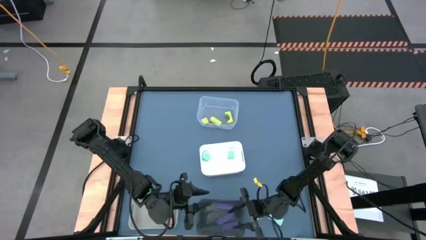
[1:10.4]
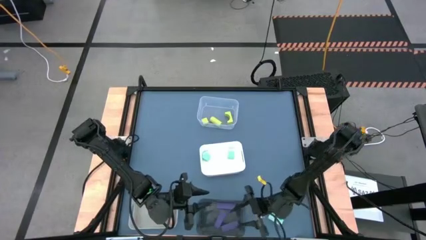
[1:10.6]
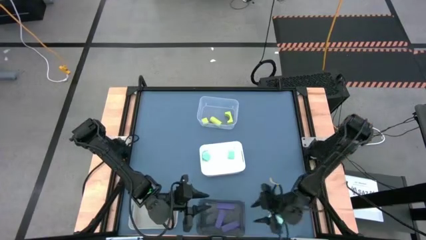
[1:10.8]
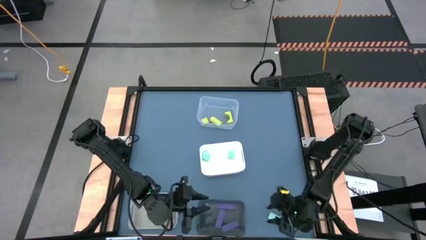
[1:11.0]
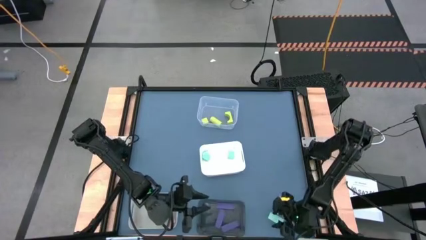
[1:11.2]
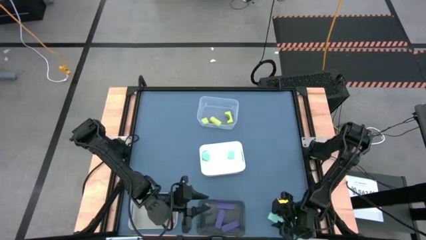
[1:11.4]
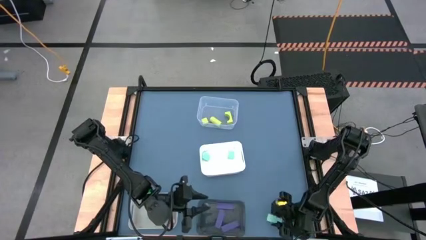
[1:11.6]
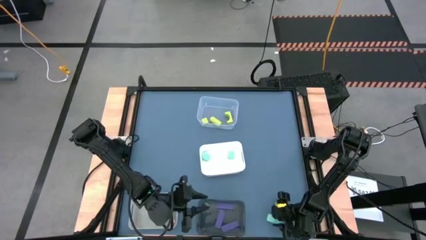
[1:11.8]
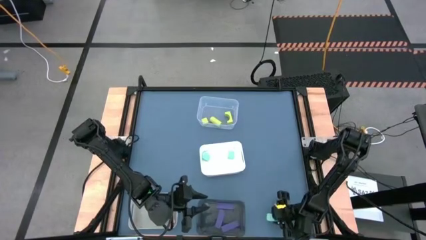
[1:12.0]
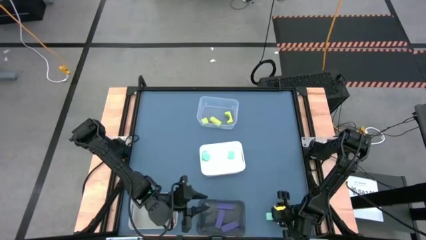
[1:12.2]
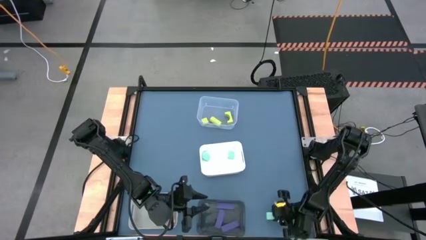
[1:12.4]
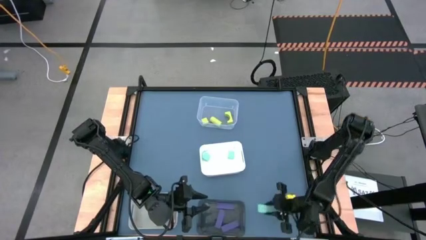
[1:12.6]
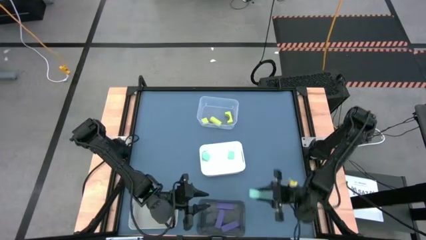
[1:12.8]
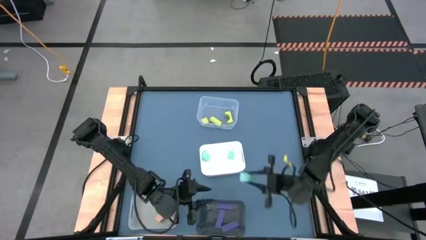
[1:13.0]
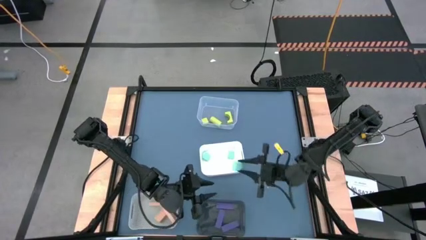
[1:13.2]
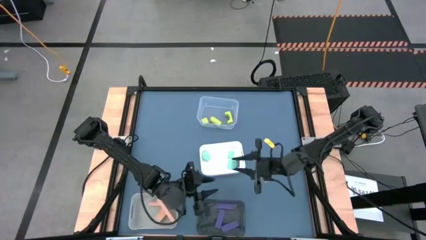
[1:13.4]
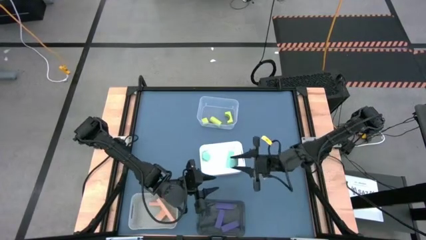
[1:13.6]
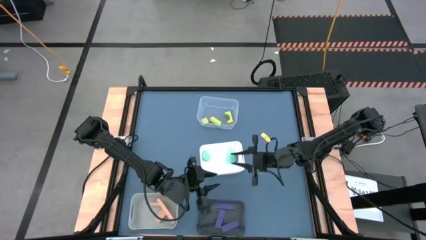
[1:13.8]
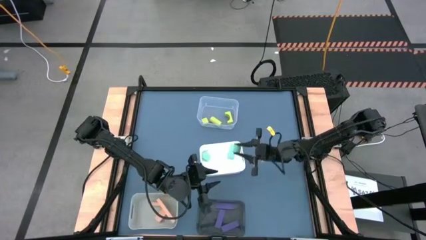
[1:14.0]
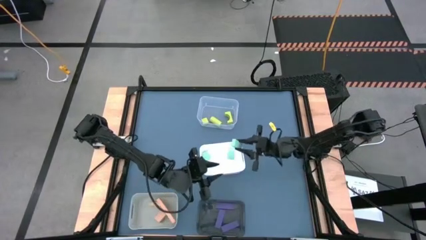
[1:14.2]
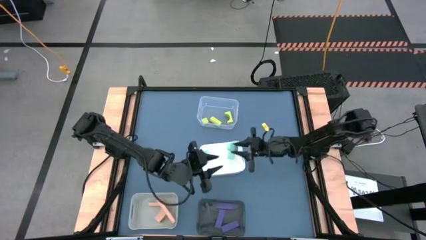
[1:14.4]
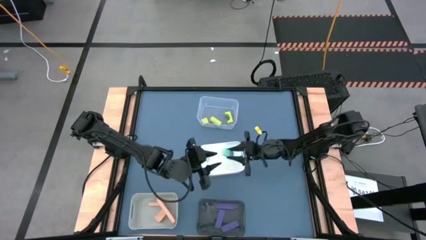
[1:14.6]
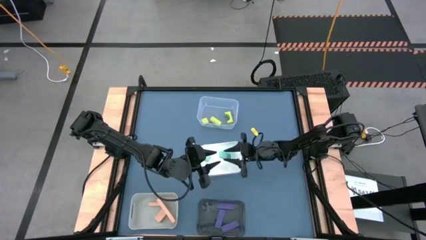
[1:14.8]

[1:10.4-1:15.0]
Task: Sort & place blocks by color
Put the blue block into the white bin

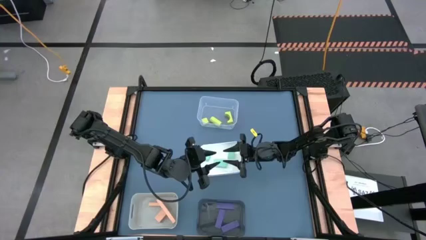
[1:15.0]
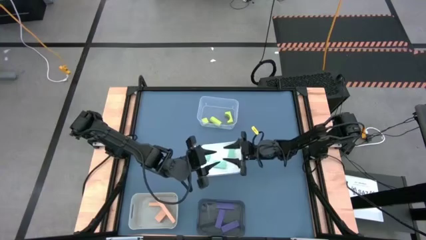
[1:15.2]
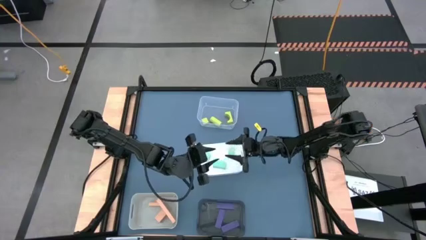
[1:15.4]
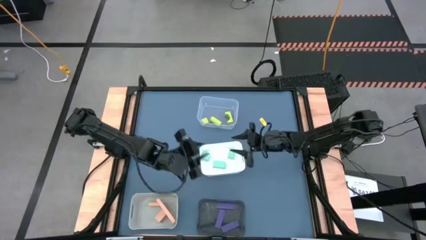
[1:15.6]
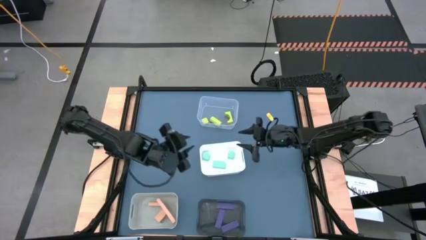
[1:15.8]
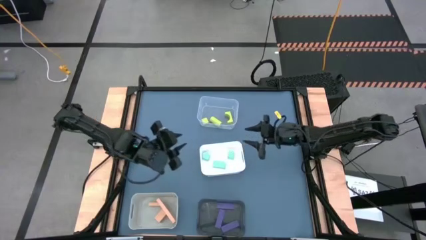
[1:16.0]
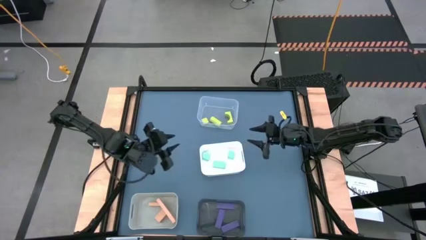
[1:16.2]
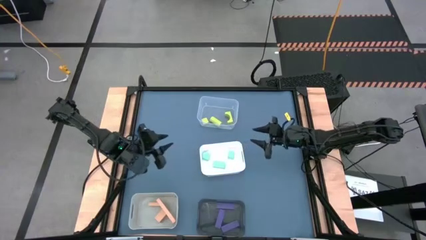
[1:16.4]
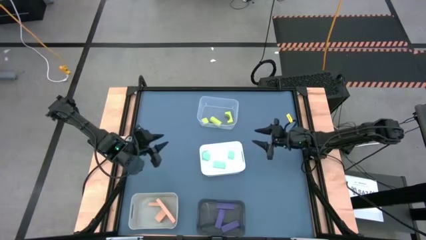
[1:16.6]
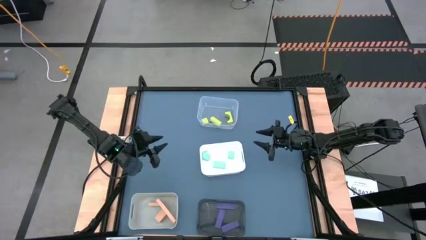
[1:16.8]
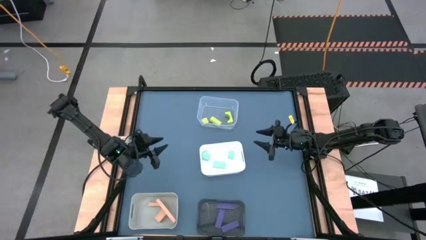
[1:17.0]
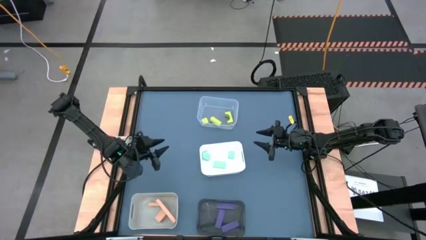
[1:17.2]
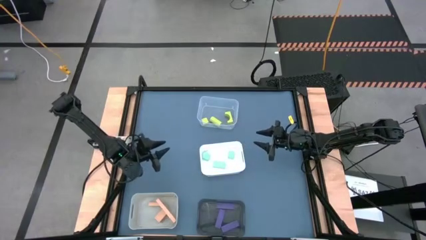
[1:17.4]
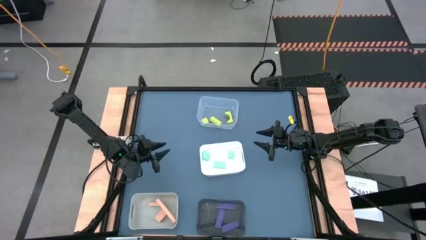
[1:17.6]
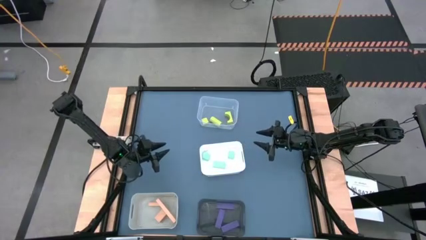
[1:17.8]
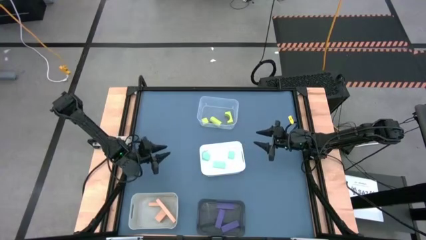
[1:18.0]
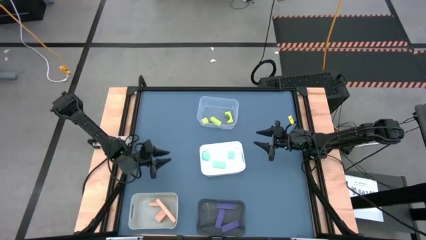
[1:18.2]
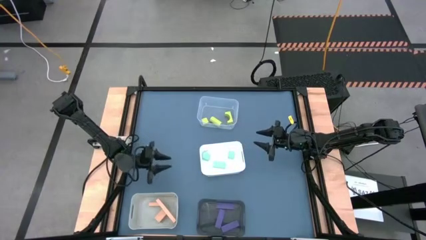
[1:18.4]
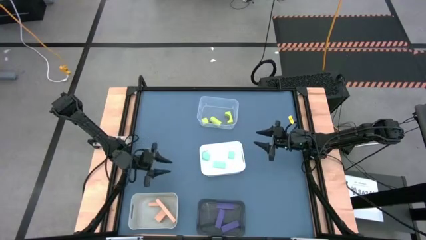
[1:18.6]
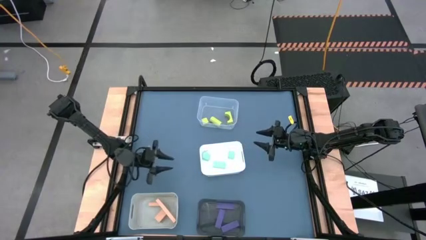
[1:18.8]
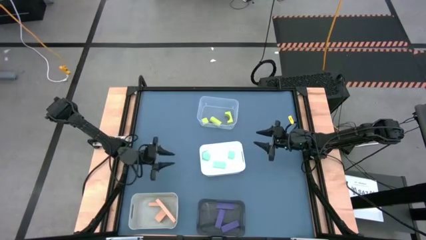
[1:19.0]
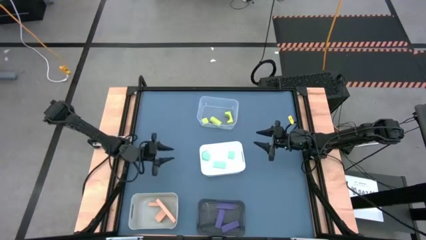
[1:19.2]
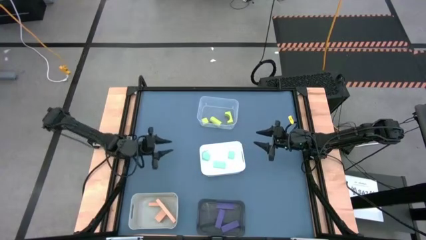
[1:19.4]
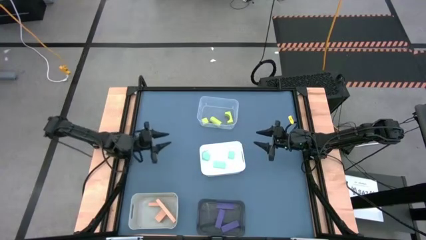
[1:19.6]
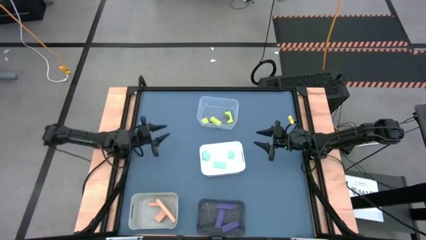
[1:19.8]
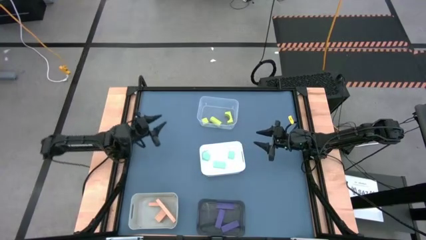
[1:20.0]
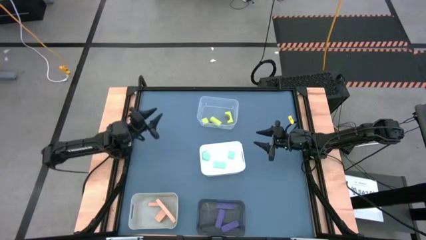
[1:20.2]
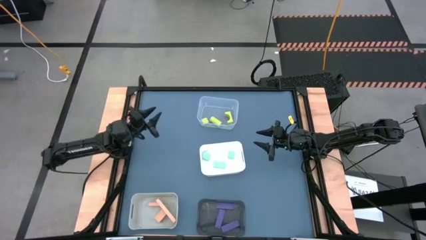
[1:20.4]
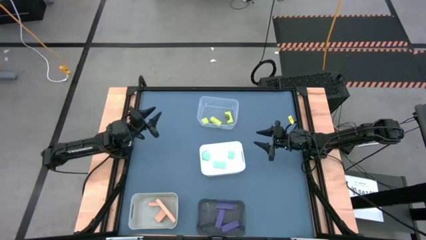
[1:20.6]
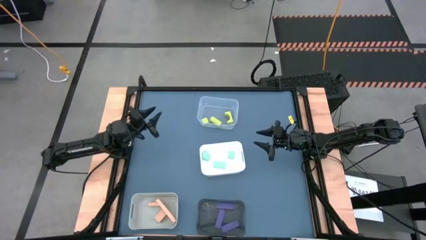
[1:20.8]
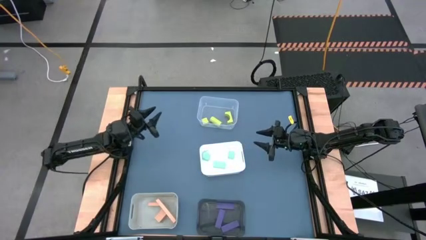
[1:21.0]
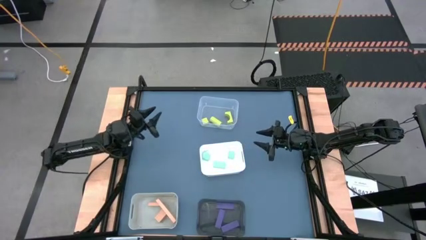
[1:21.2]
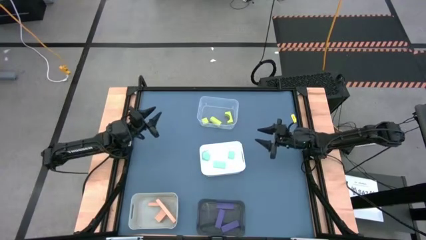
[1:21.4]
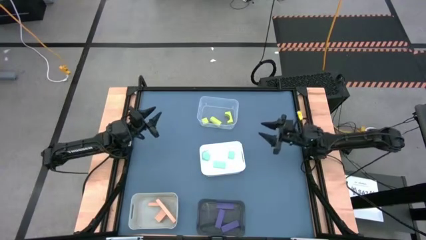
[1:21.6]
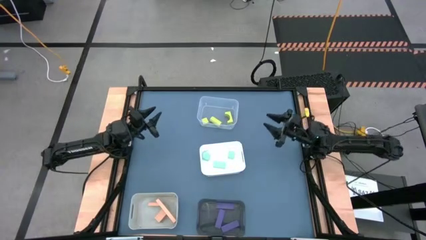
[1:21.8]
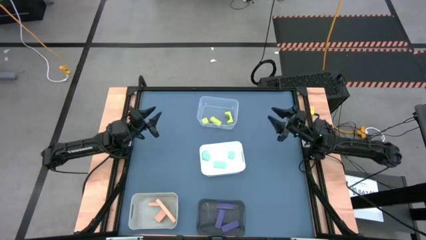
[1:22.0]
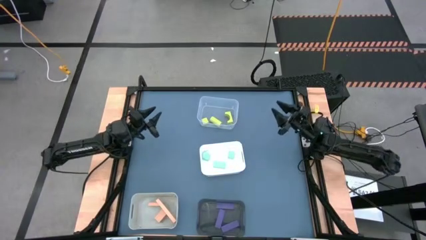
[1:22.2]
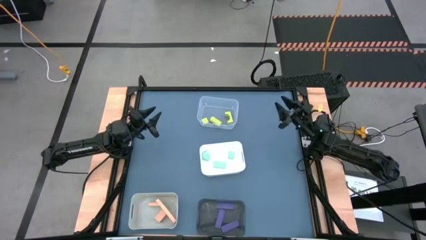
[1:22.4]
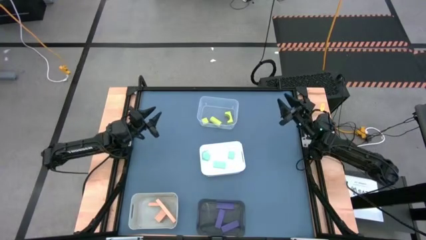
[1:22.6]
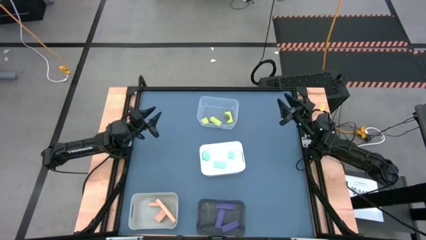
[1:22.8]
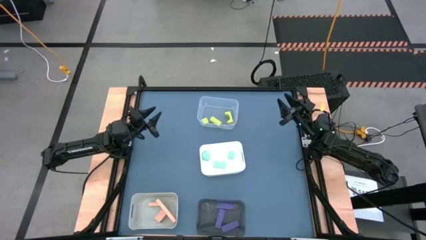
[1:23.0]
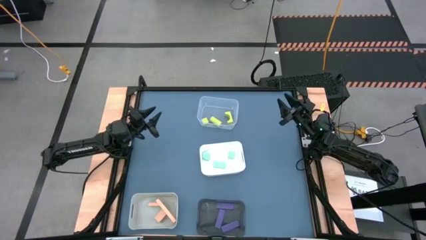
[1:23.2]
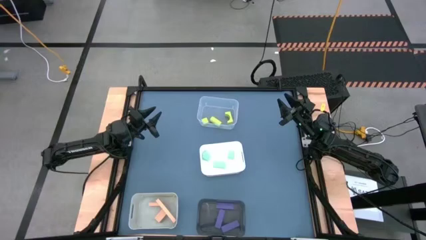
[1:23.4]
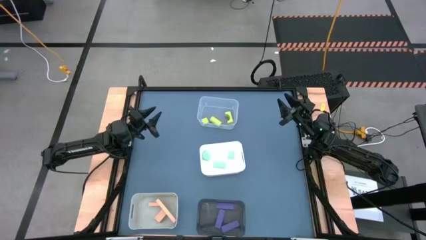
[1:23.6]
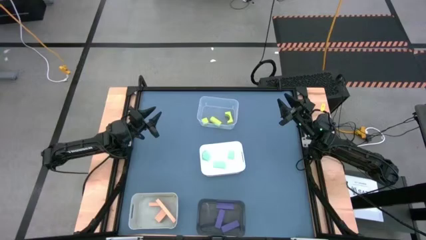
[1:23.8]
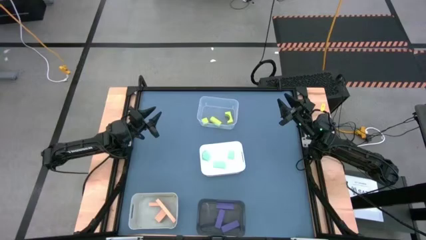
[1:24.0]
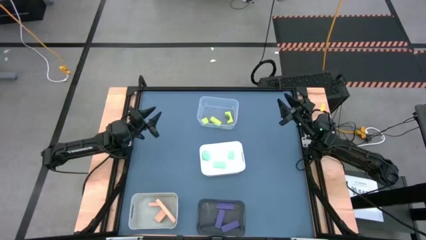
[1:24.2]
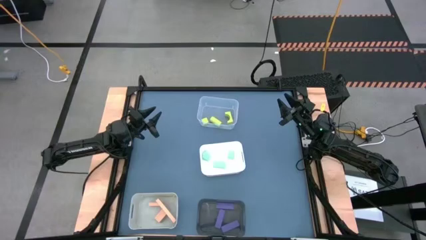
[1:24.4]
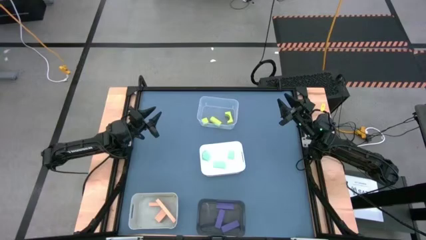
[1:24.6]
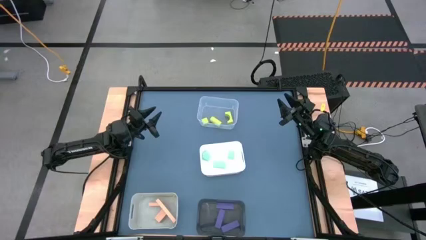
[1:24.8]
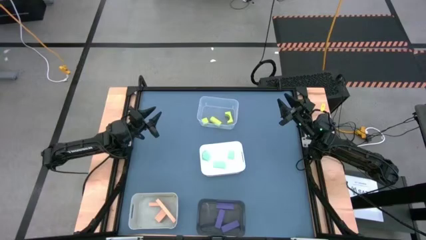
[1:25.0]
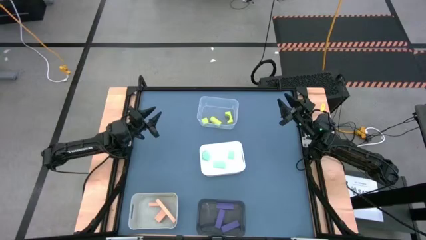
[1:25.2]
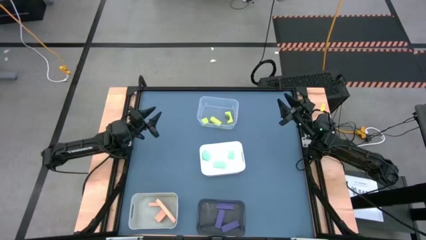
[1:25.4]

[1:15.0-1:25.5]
Return to Home Position
